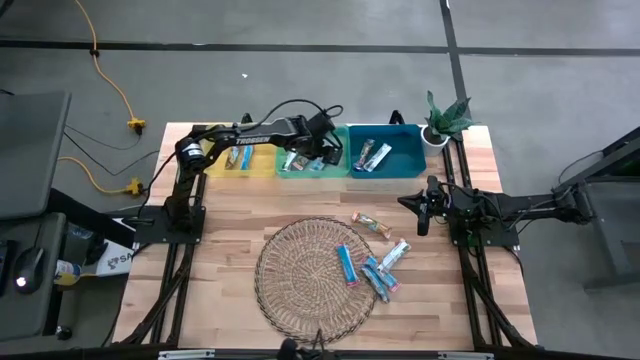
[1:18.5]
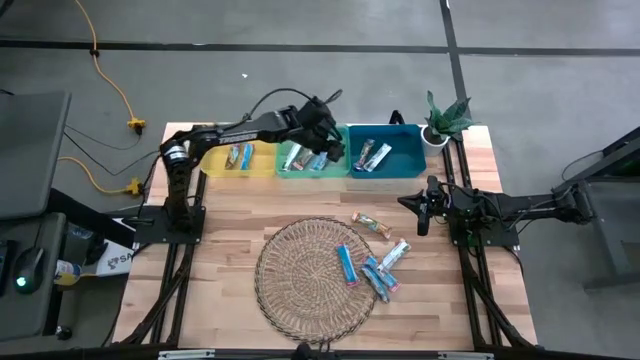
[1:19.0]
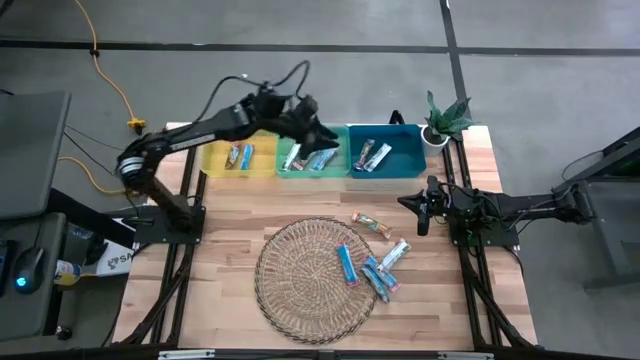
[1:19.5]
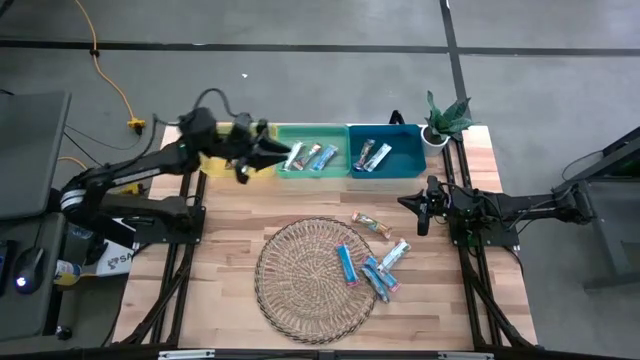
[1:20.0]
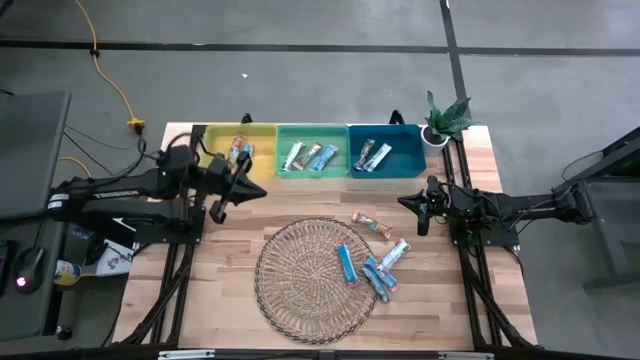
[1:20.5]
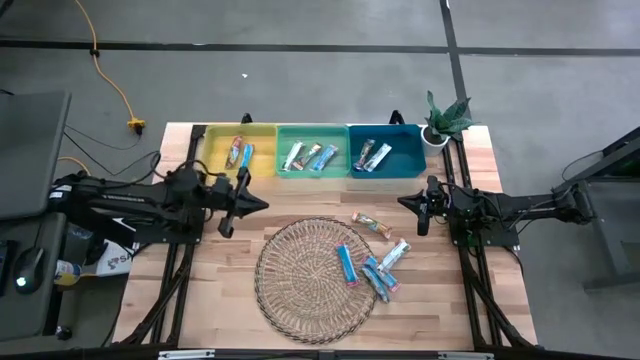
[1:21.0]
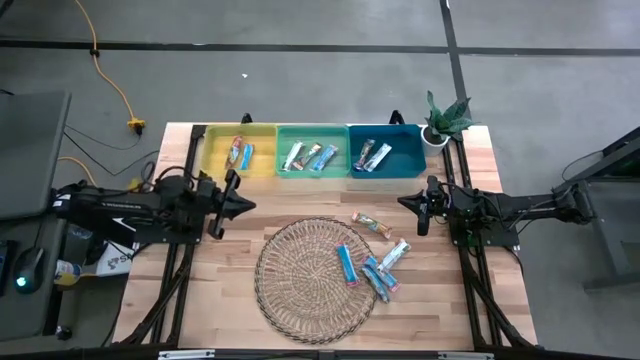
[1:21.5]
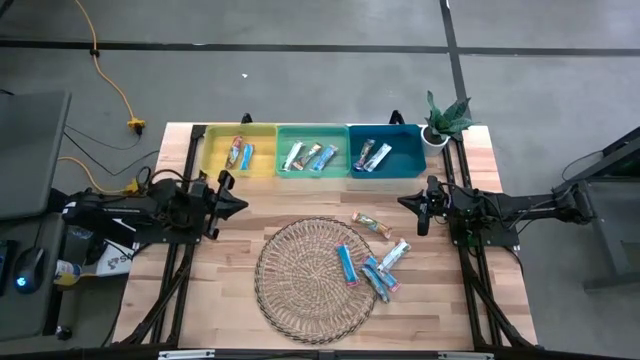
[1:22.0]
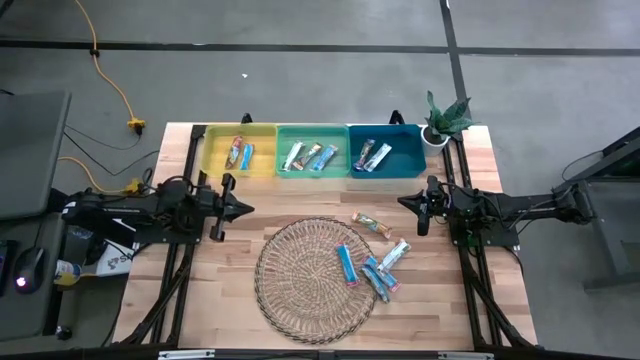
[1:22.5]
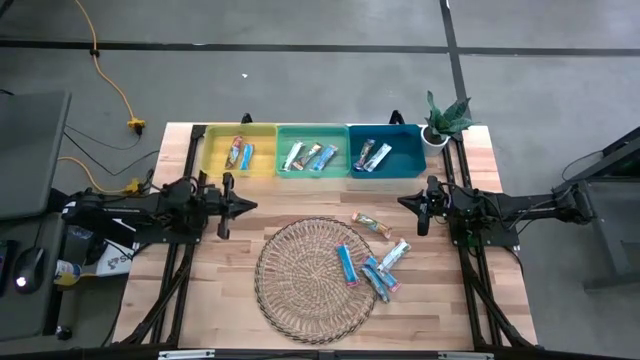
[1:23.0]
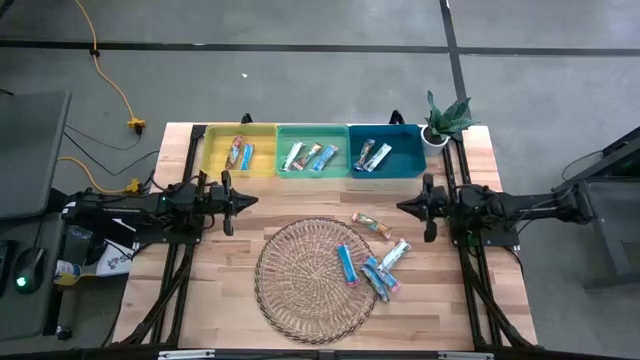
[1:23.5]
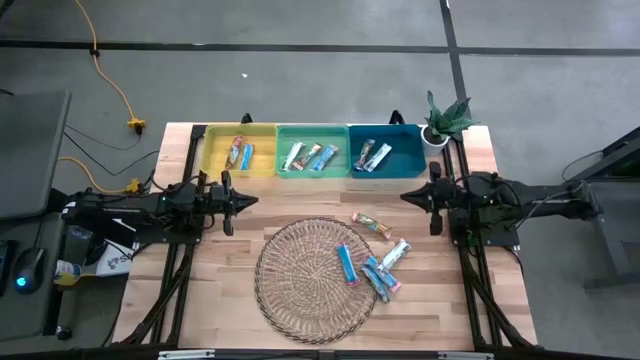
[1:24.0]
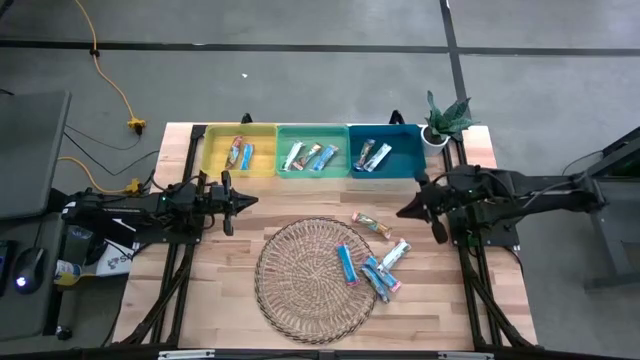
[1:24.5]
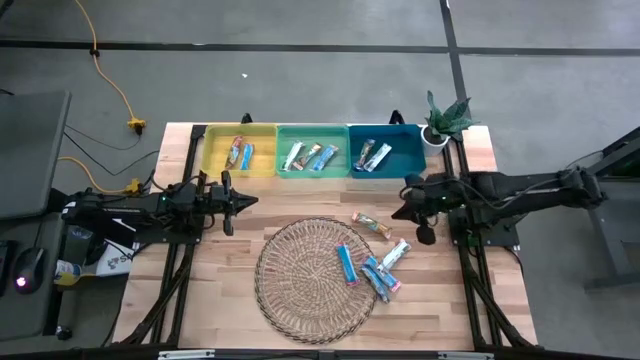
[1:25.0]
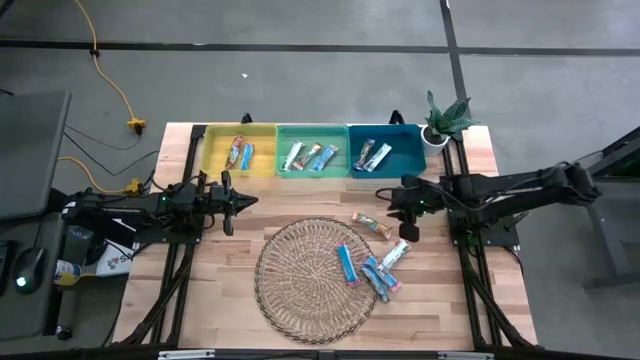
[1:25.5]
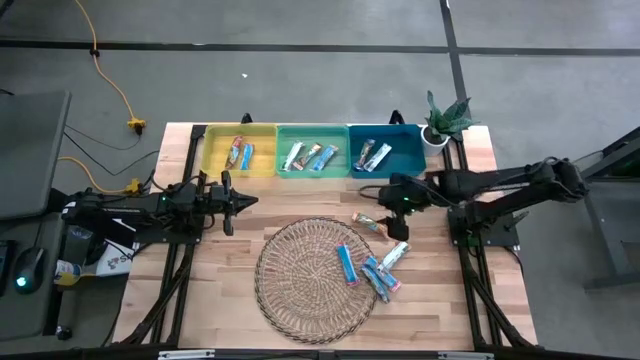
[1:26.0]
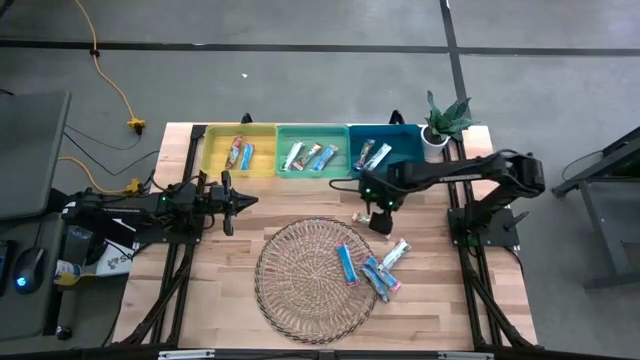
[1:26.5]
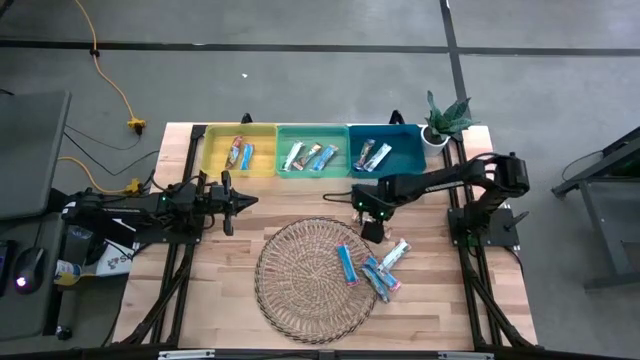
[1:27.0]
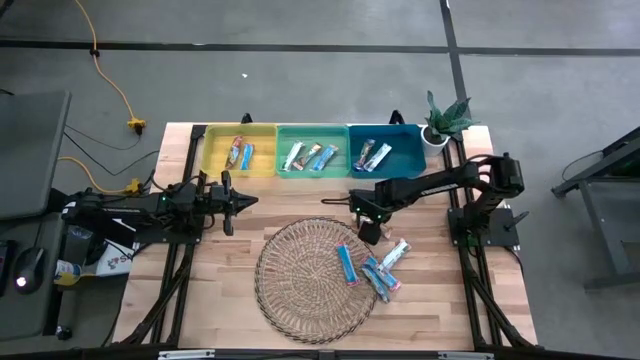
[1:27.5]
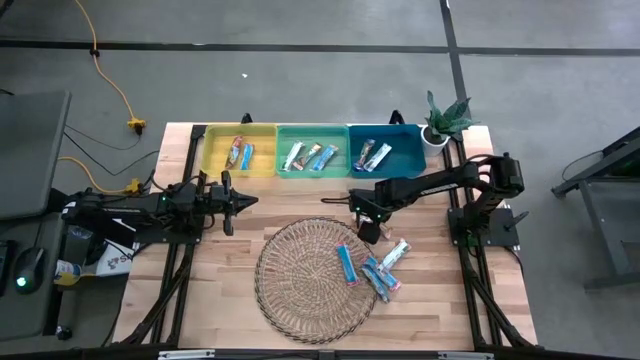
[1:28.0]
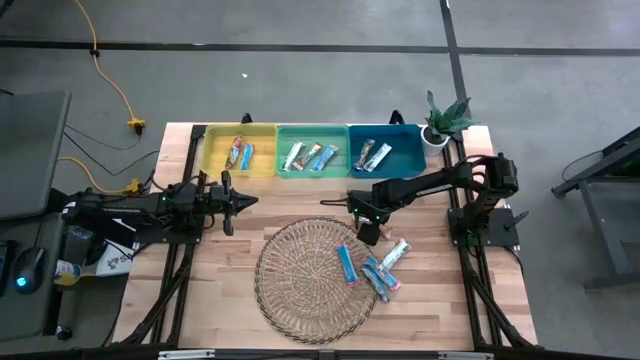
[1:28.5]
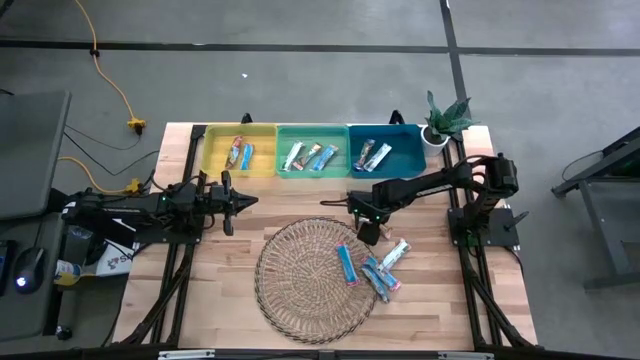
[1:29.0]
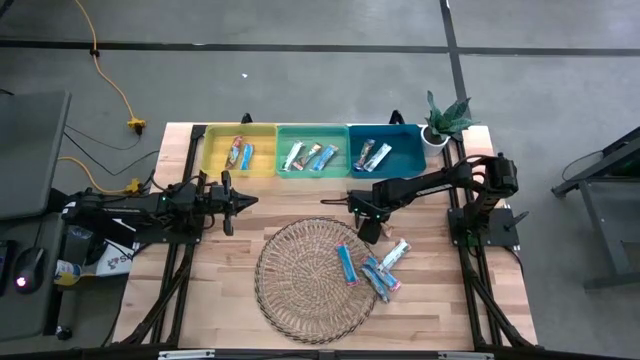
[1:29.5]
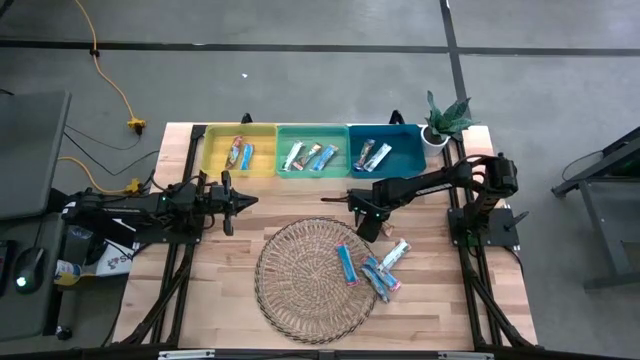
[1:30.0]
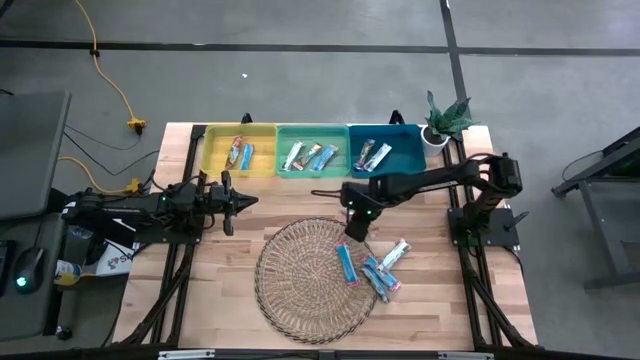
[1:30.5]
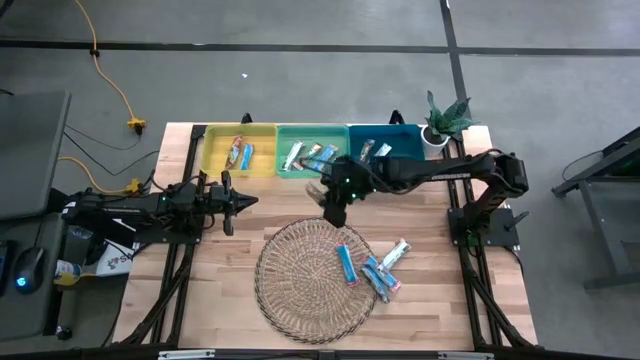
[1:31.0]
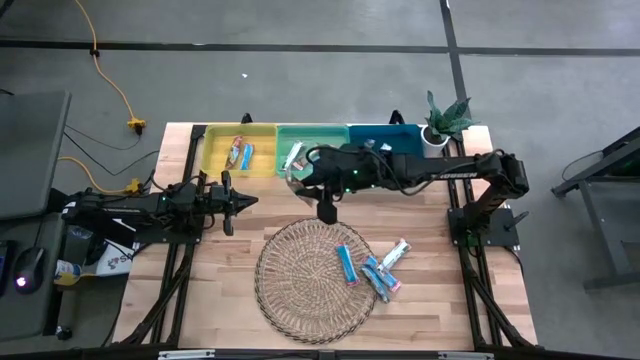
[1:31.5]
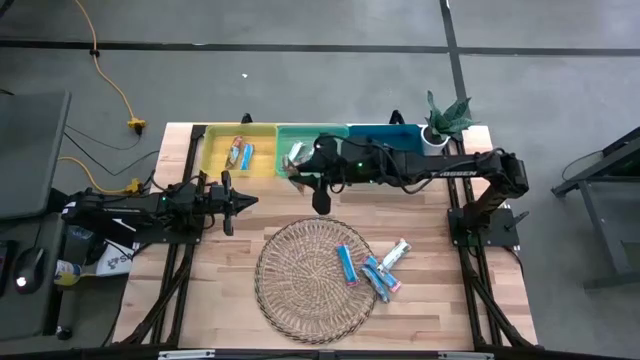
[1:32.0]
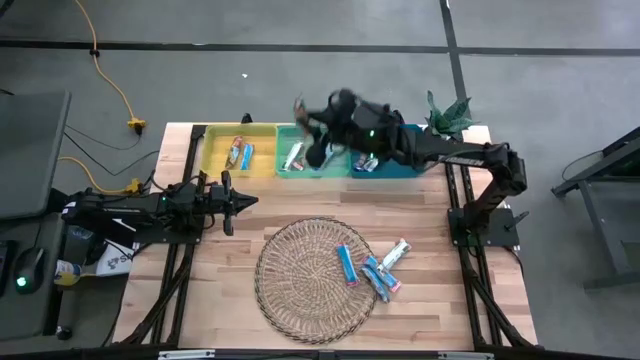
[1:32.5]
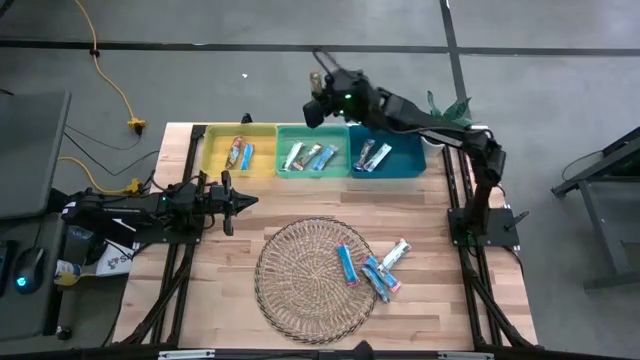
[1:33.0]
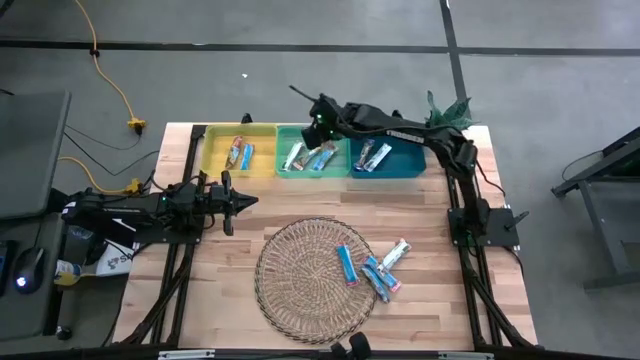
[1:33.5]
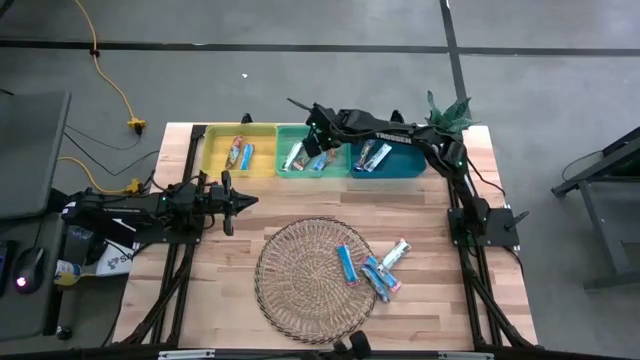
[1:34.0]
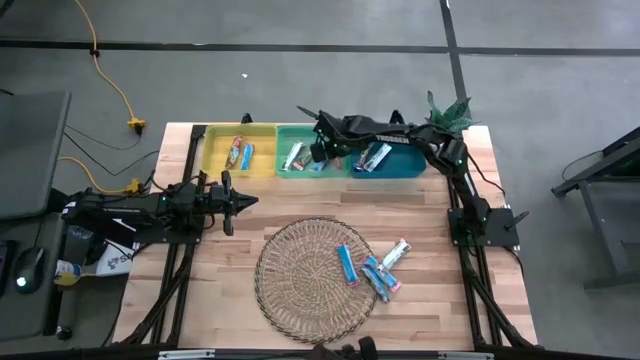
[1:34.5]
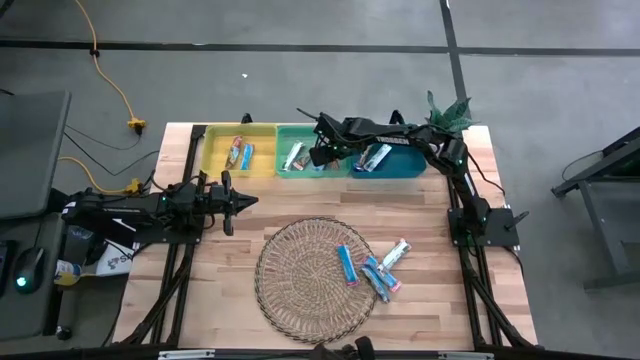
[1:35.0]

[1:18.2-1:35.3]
Task: Pick and place Granola Bars by type
Put the yellow granola bar into the green bin

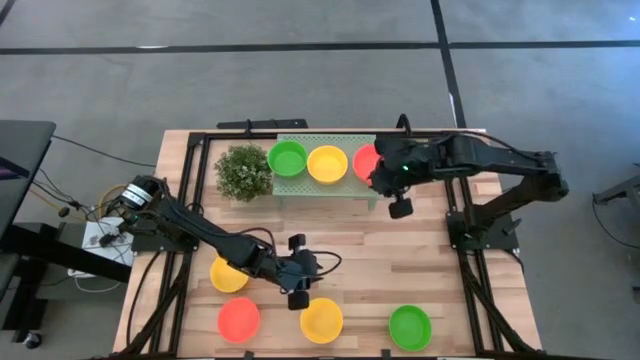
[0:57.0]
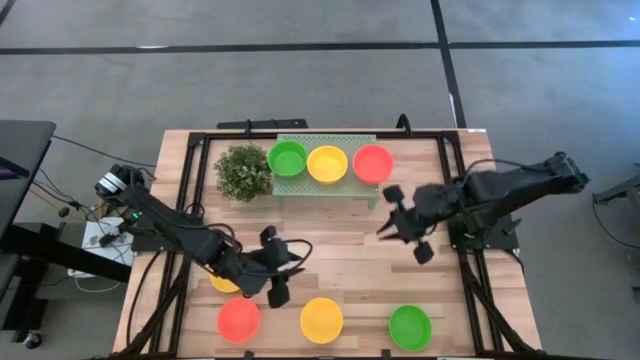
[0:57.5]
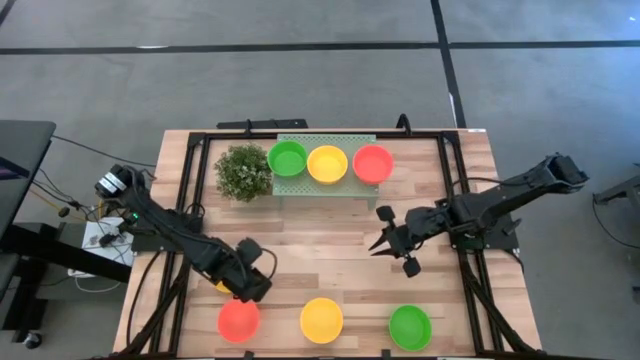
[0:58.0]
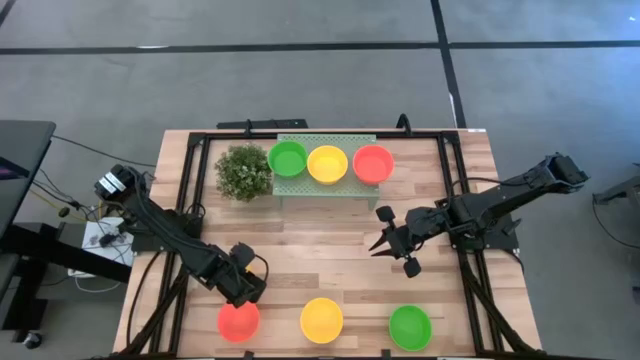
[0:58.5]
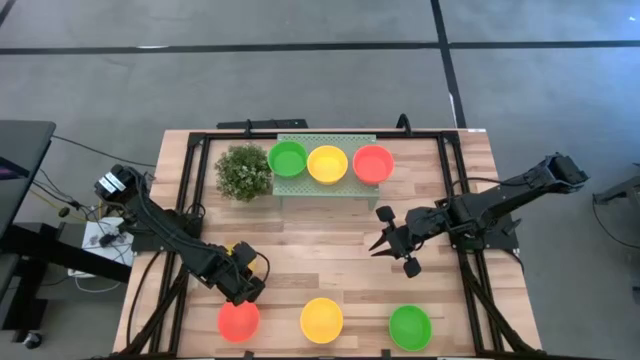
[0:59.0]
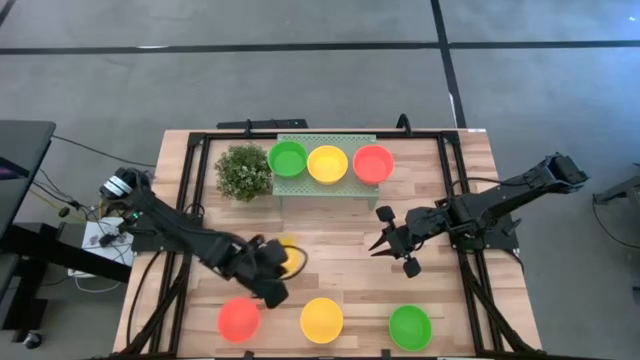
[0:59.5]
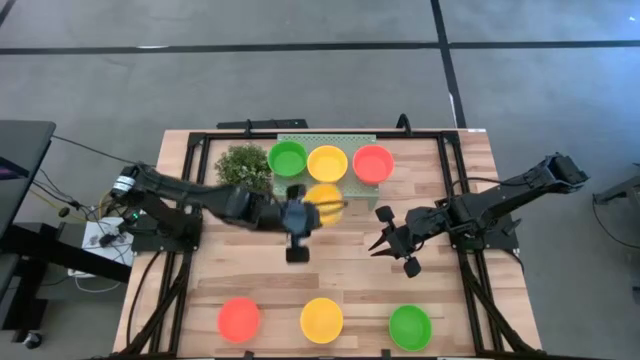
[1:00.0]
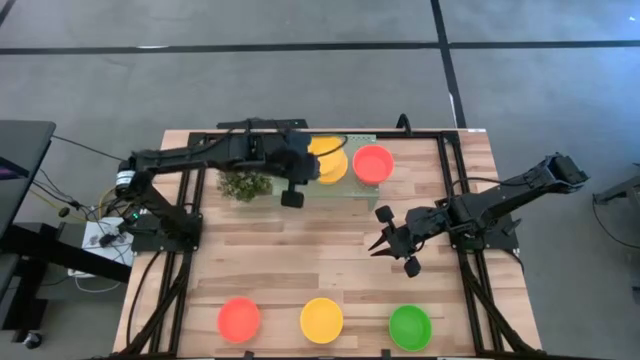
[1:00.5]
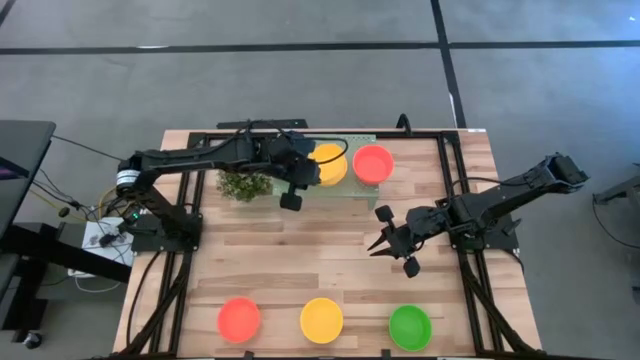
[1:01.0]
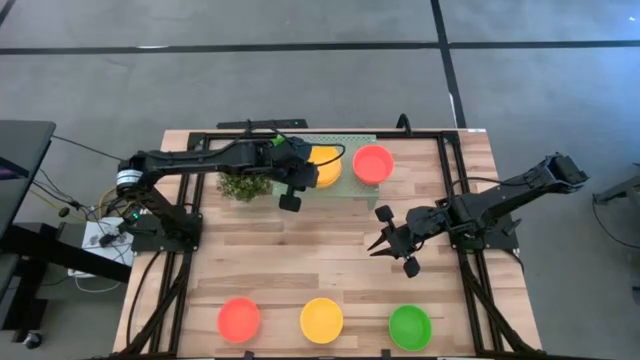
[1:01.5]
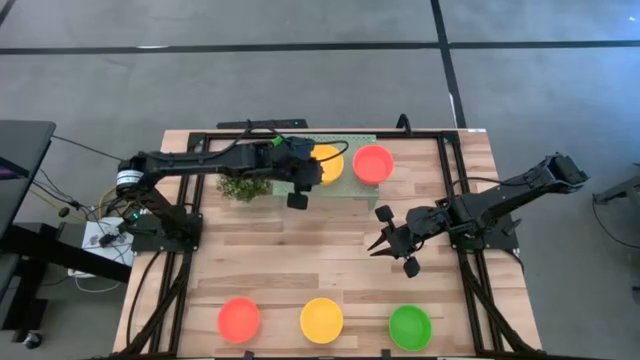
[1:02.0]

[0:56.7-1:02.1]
Task: Pick & Place Mini bowls
Stack the yellow bowl on the yellow bowl on the shelf
